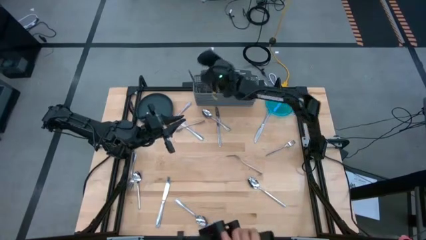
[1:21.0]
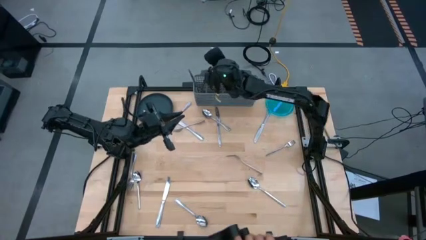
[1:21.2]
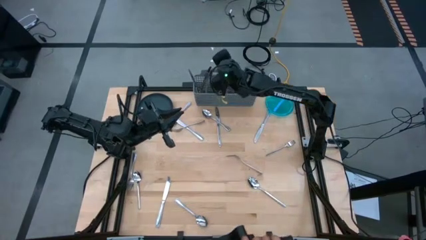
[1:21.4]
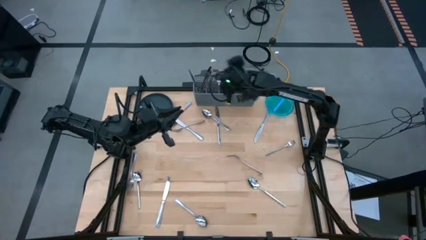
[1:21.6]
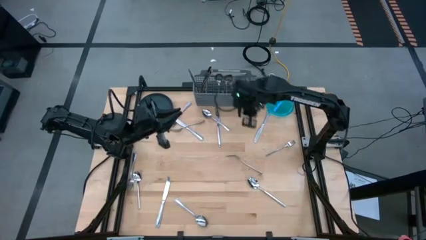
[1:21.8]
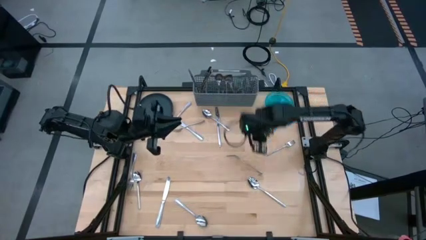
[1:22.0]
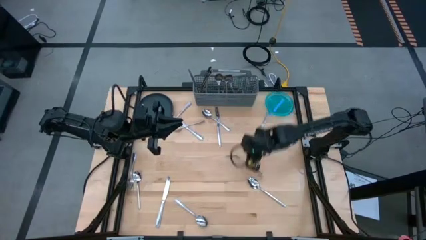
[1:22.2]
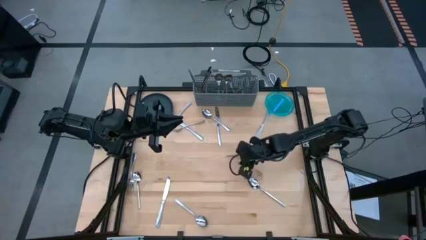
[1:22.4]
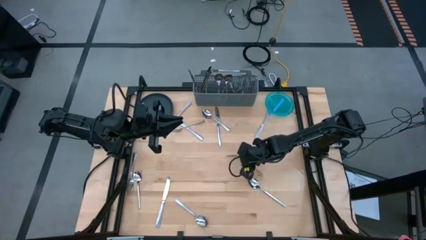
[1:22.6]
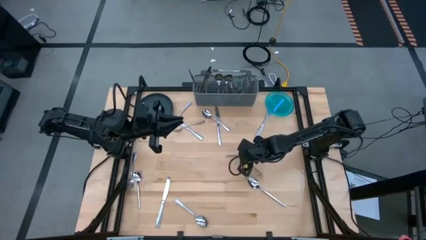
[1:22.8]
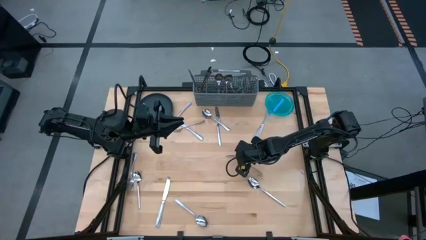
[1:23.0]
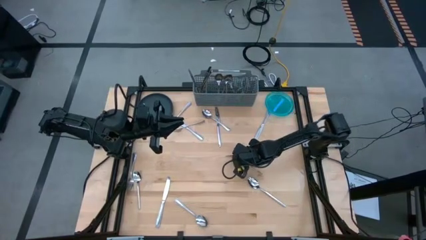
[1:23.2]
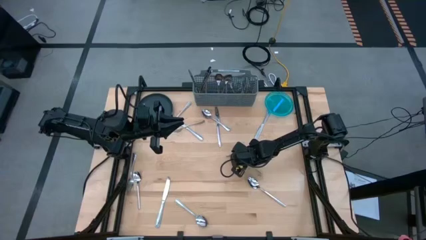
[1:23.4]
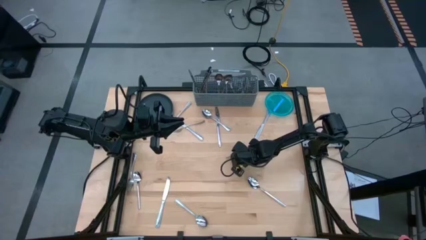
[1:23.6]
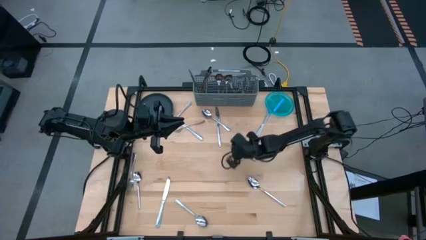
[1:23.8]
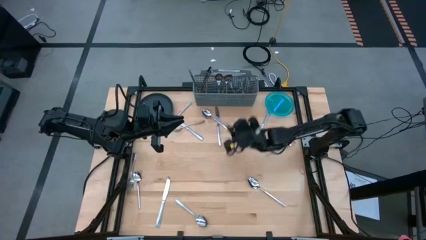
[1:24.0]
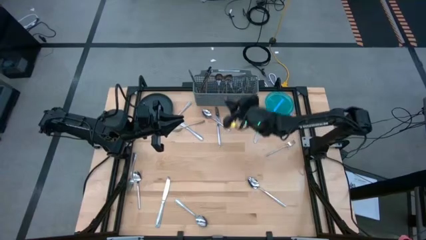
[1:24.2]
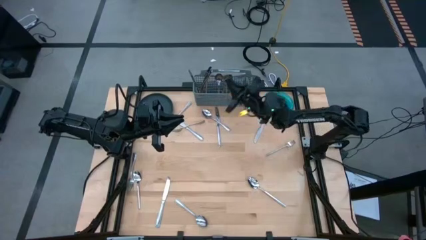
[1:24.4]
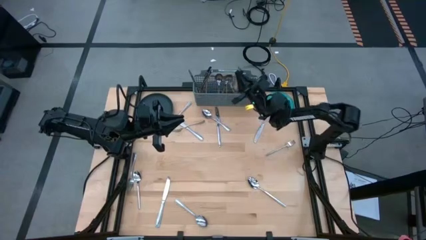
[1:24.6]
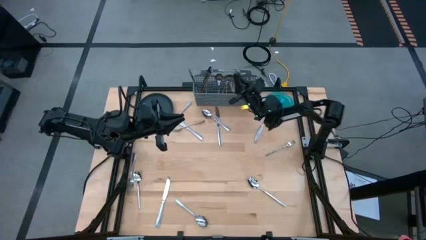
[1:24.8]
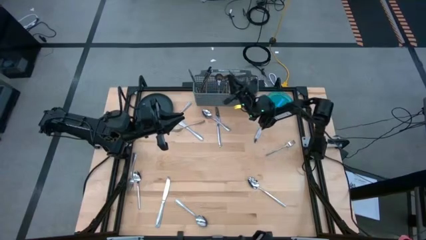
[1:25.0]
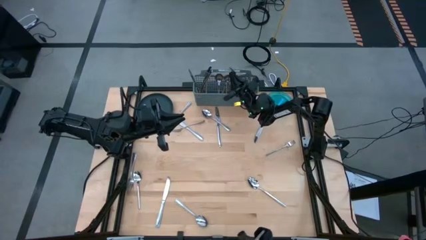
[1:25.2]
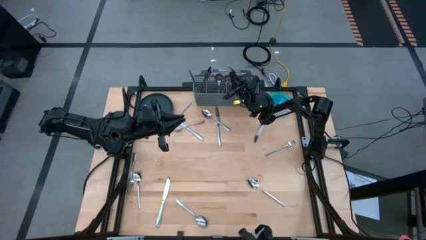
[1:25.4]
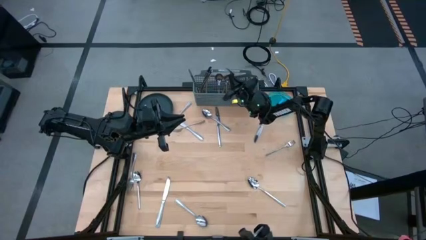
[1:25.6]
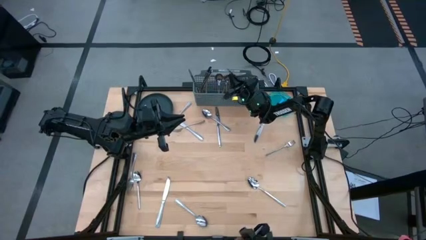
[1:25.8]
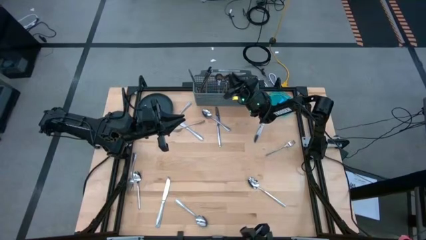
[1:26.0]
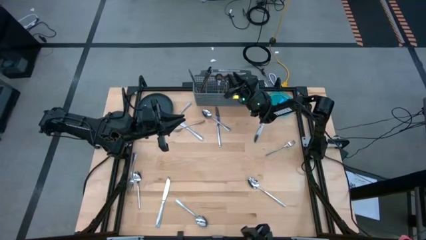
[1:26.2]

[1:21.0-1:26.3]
Task: Sort silverware
Put the fork into the silverware basket

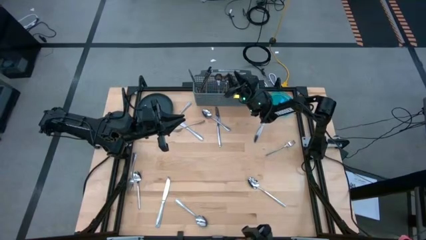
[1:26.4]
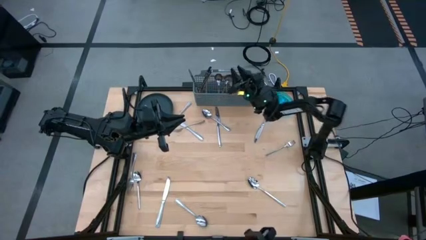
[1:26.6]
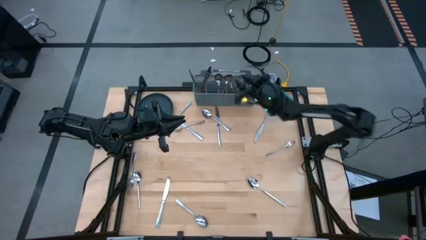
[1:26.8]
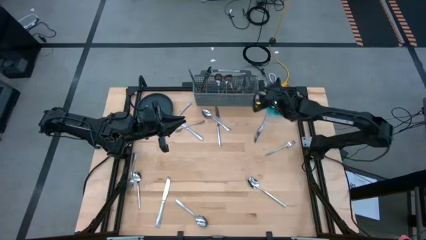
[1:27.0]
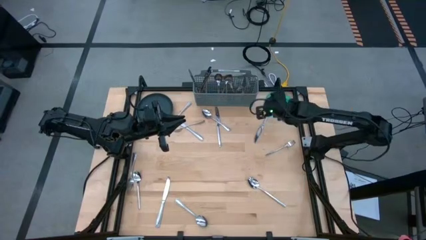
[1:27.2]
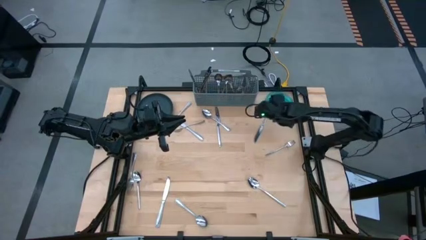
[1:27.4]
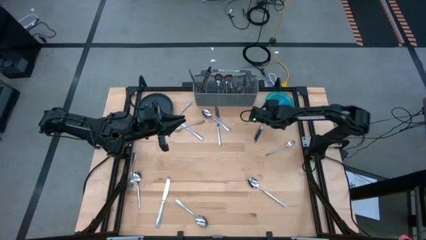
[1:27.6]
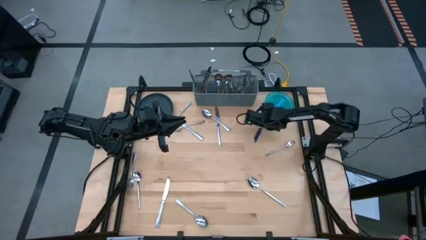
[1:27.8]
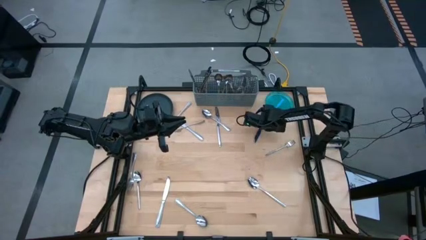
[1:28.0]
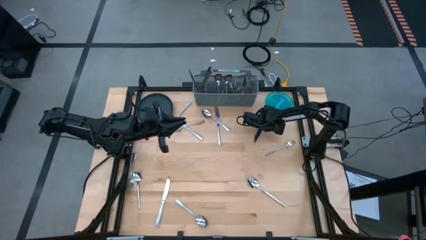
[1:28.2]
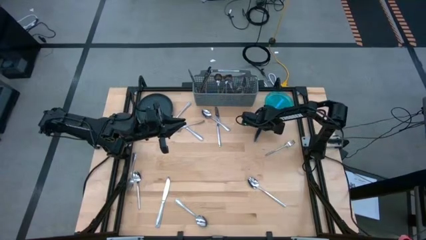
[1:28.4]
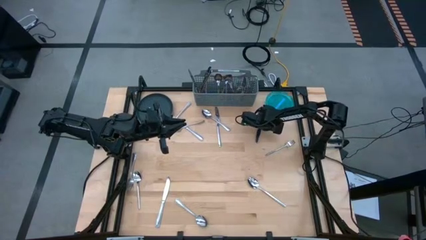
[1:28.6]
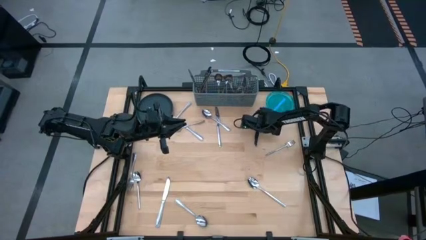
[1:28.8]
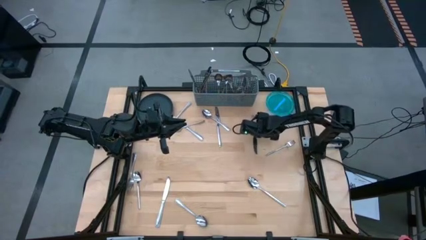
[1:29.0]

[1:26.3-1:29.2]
Put the knife into the silverware basket
